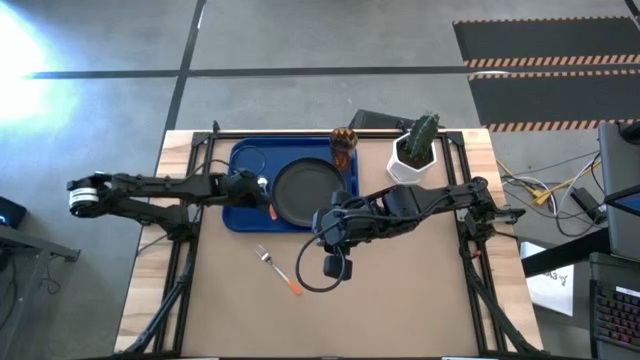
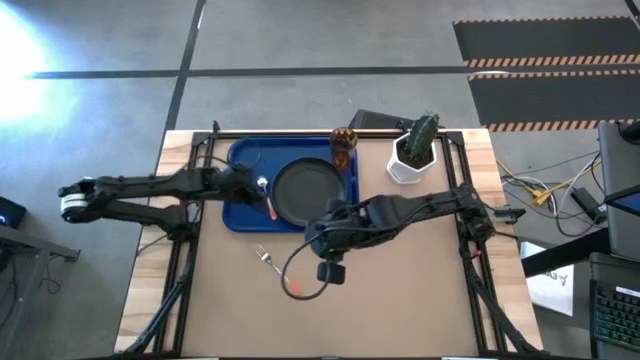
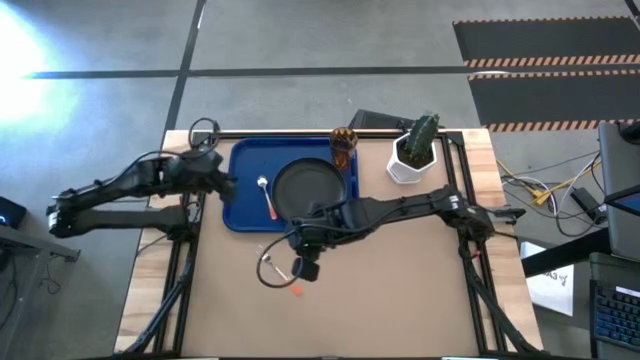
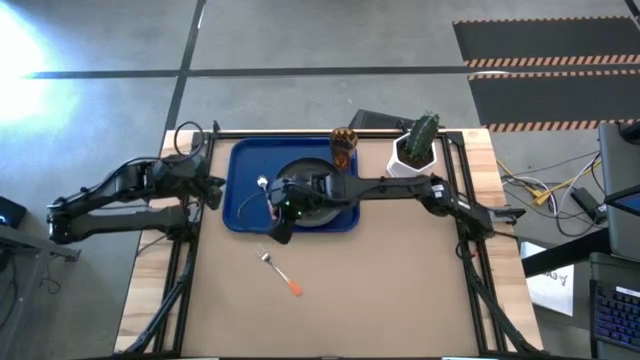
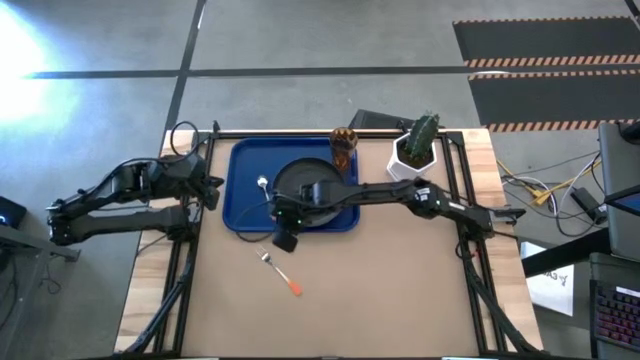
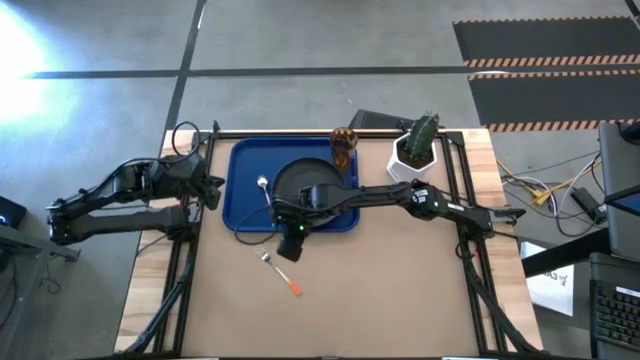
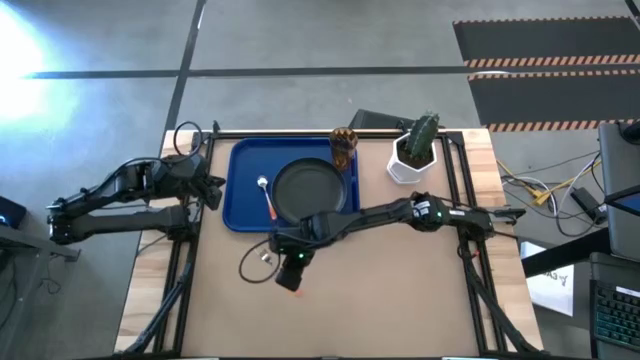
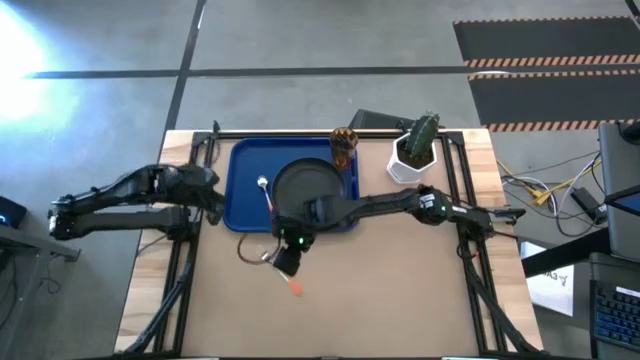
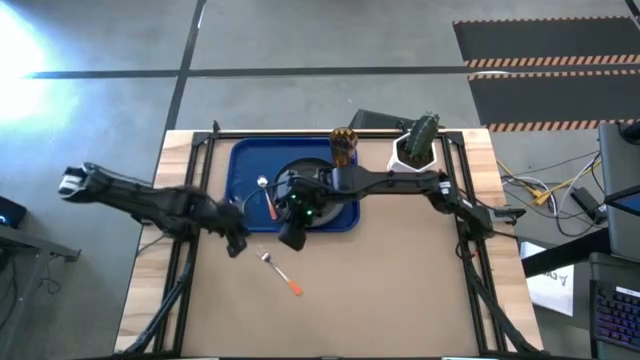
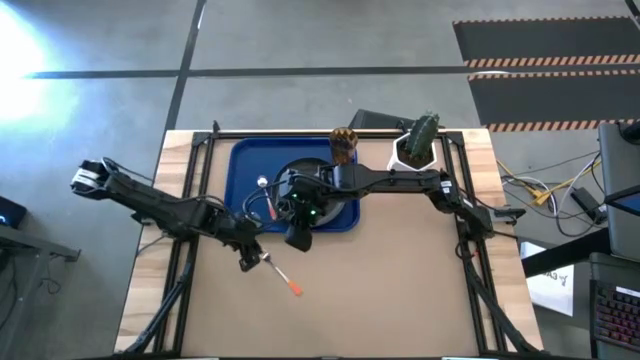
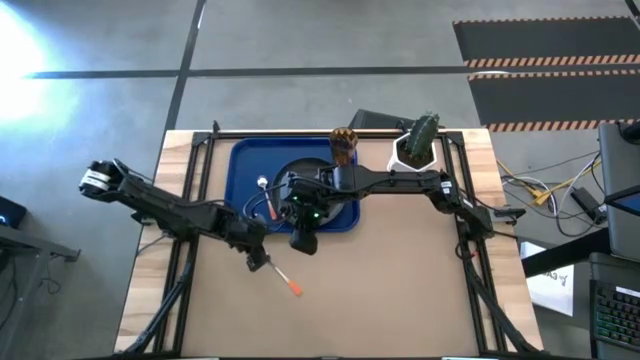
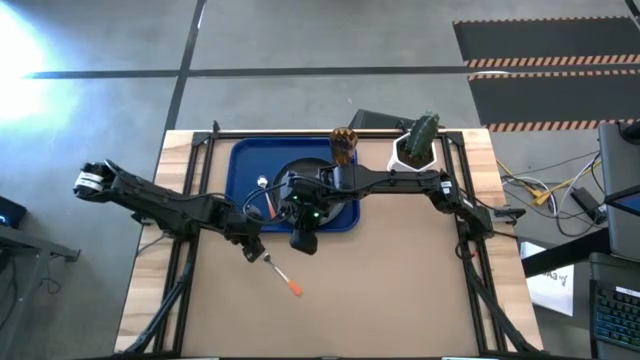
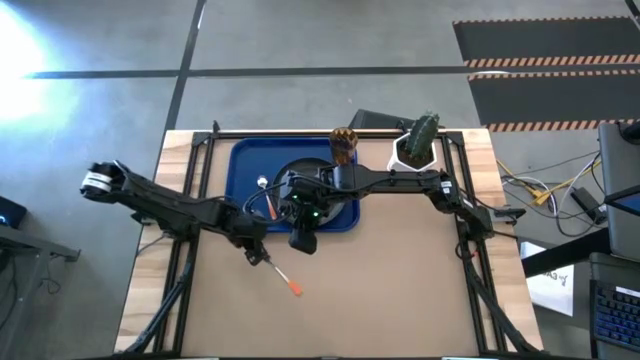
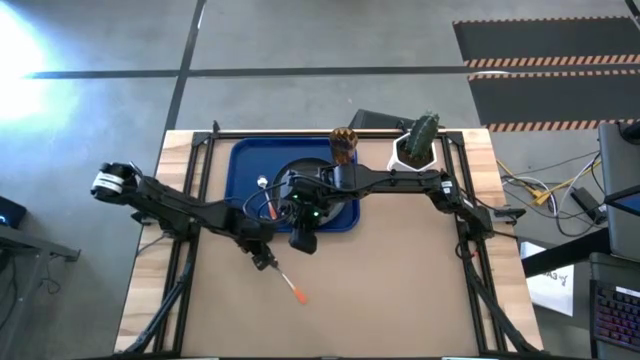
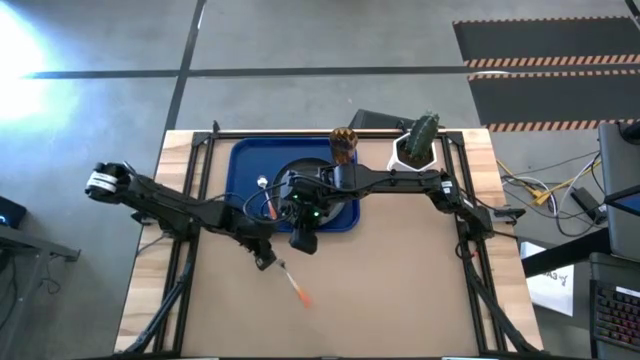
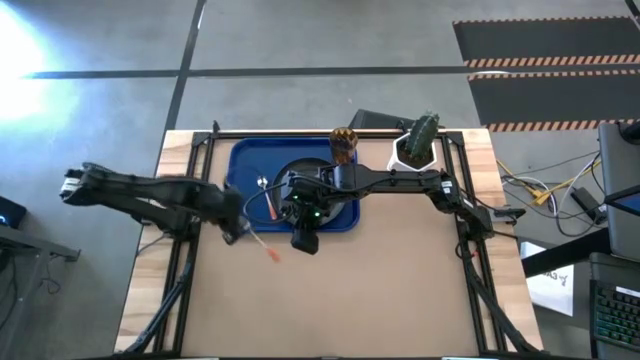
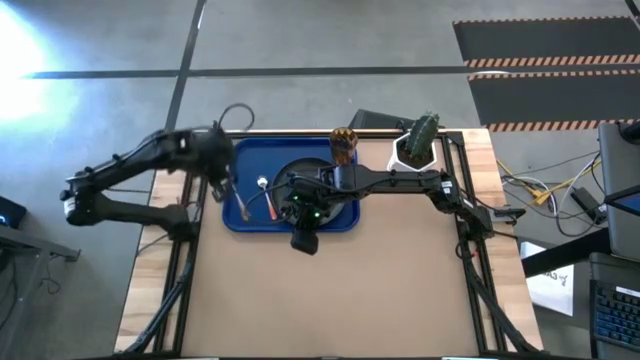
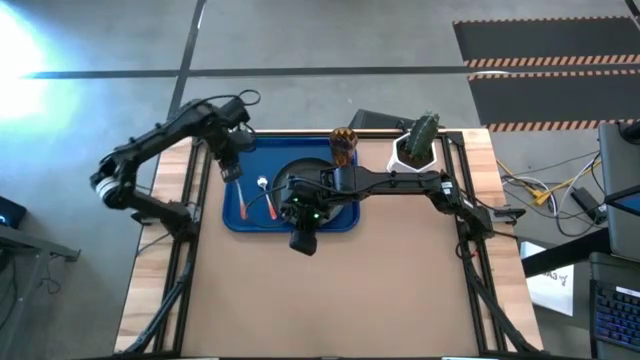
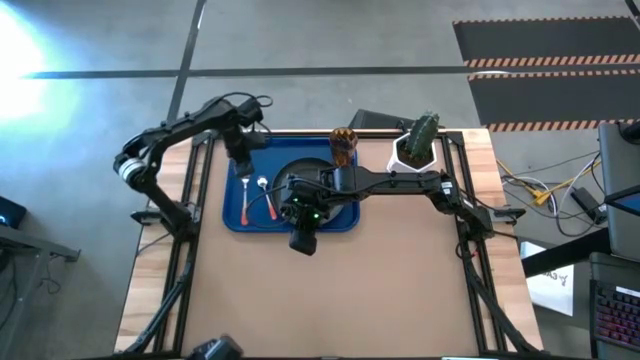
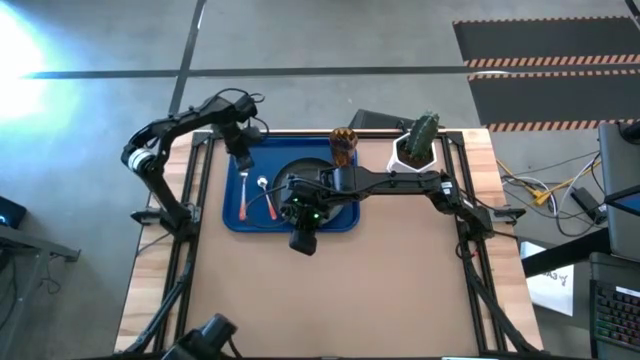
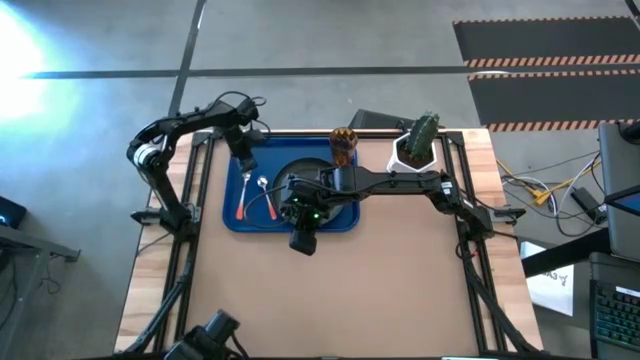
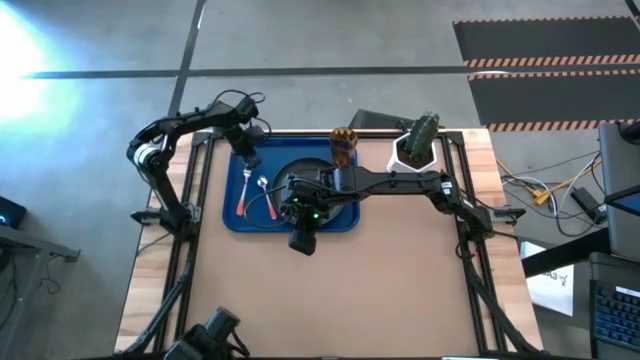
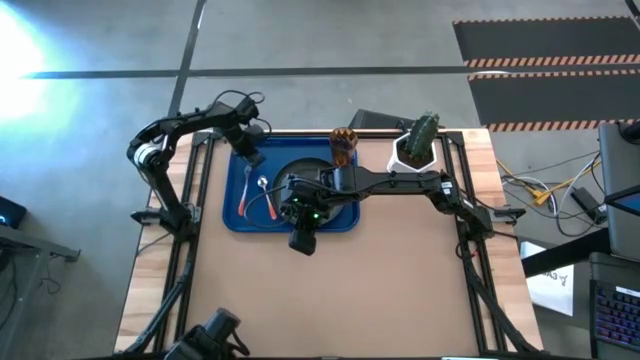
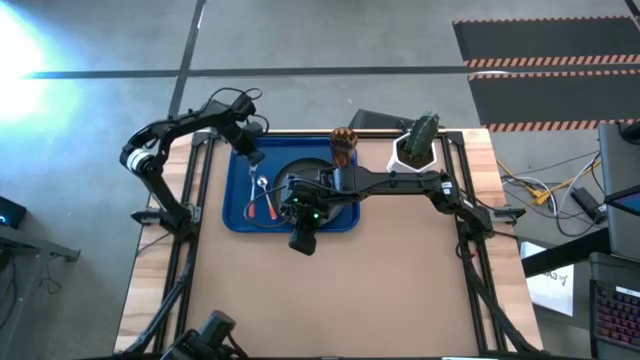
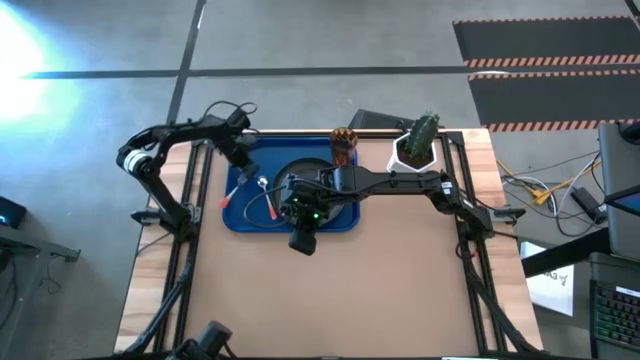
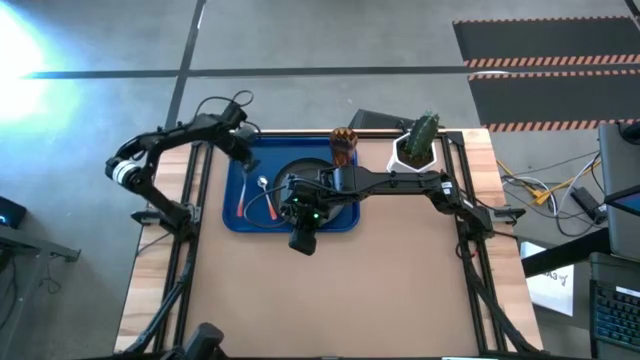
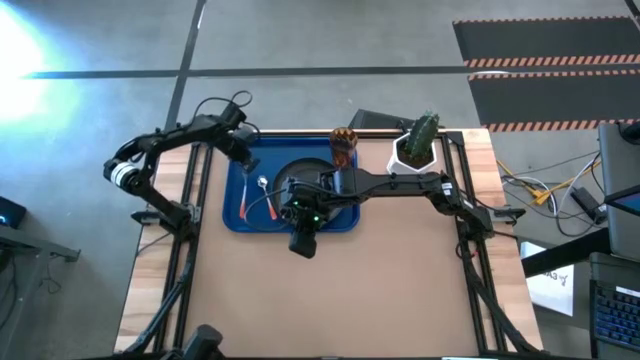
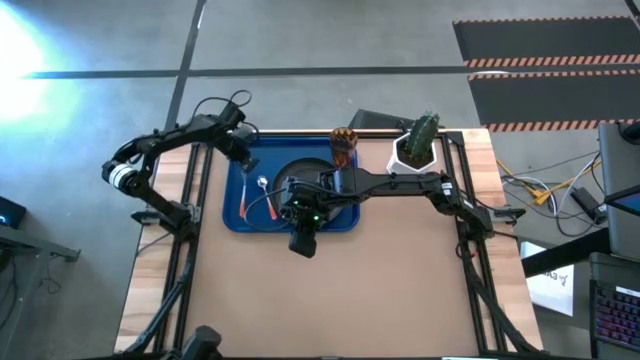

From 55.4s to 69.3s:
Task: Pick and place plate/cup/fork/spoon on tray
Put the orange fork on the blue tray to the left of the orange spoon

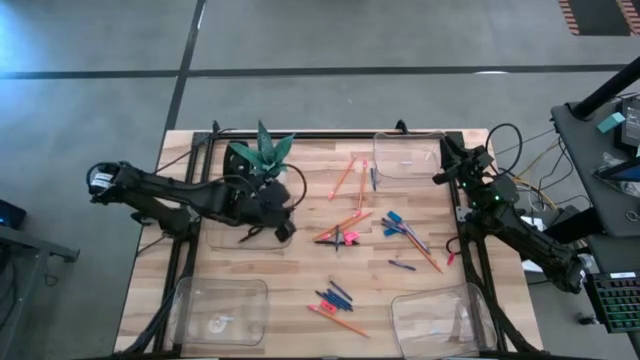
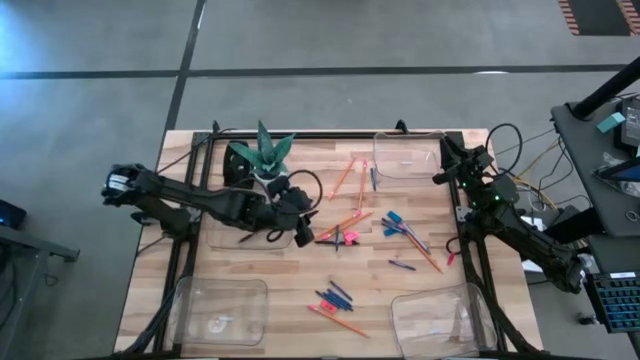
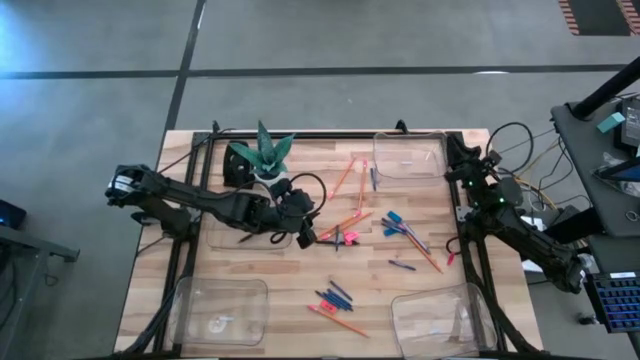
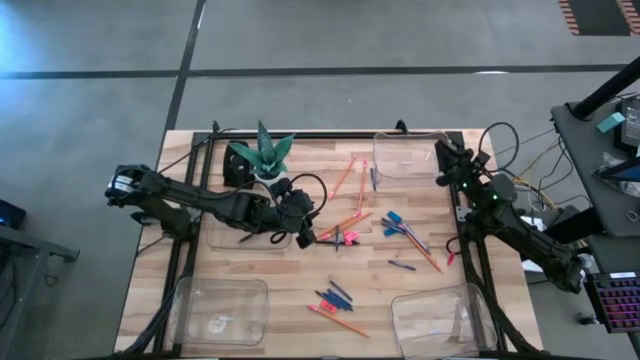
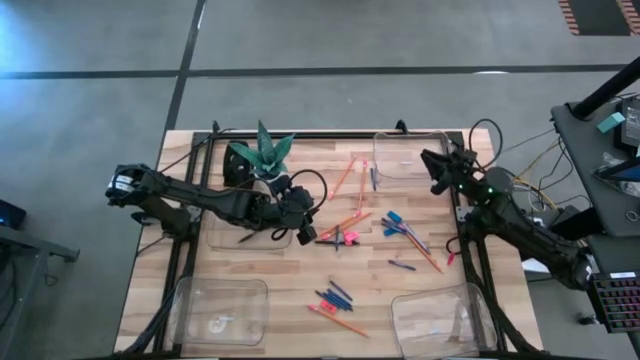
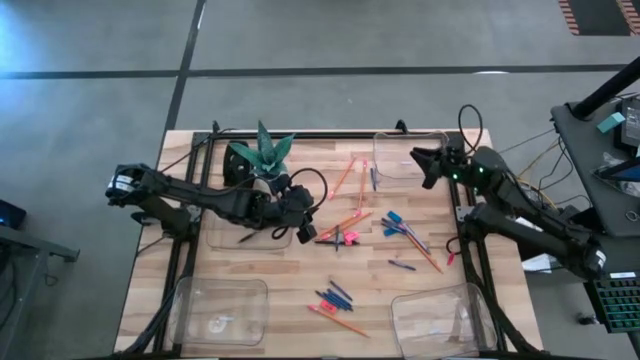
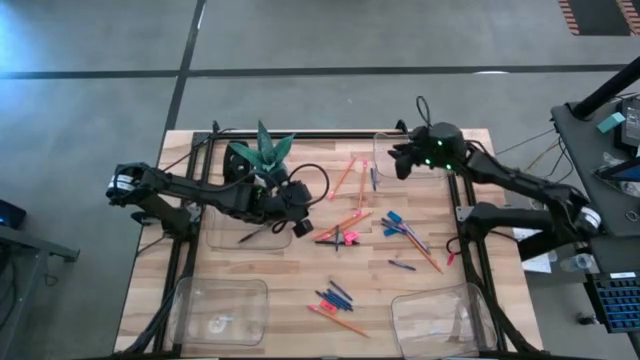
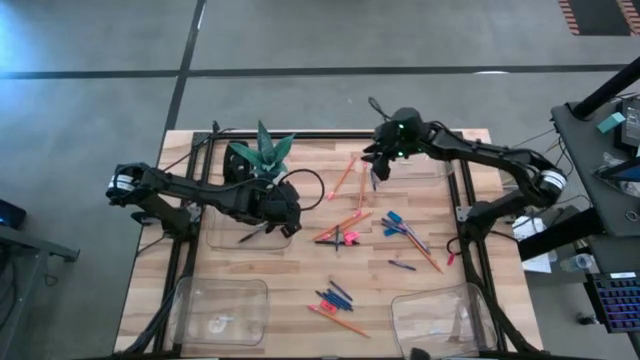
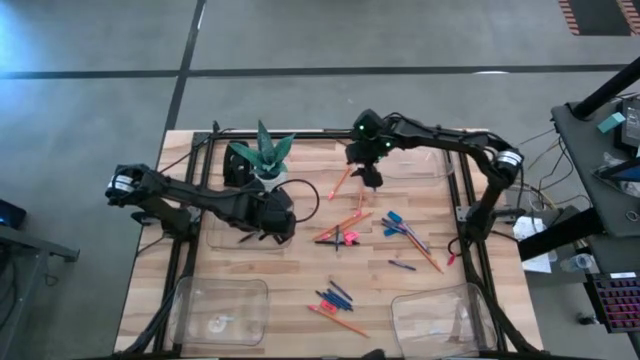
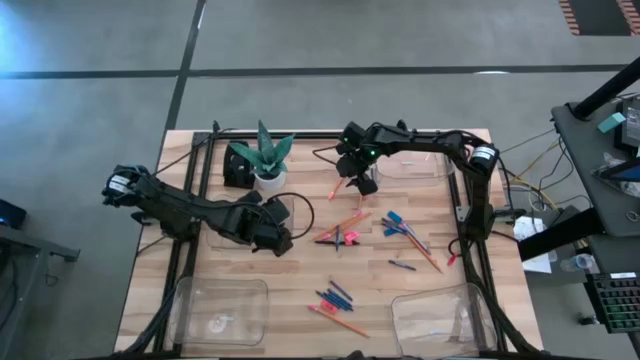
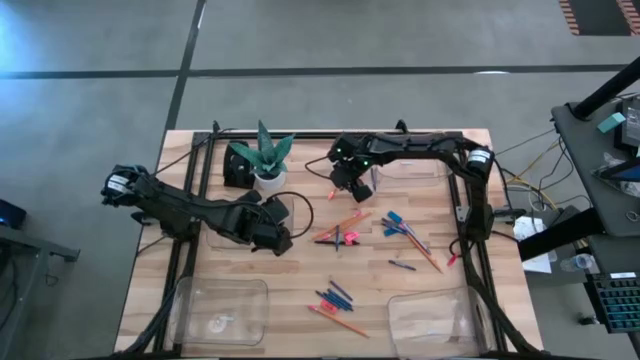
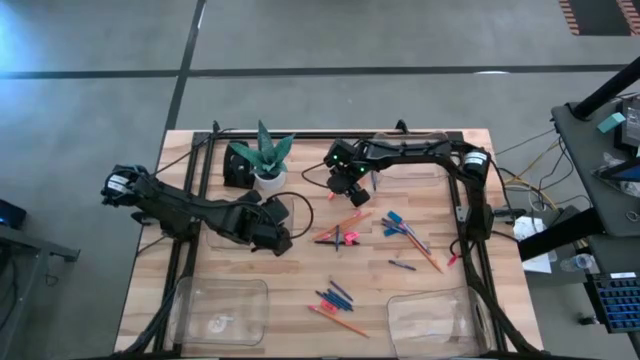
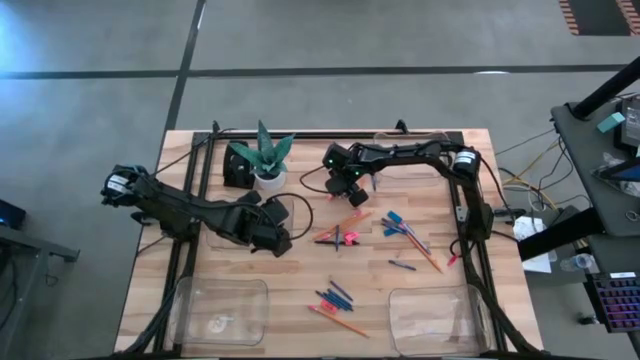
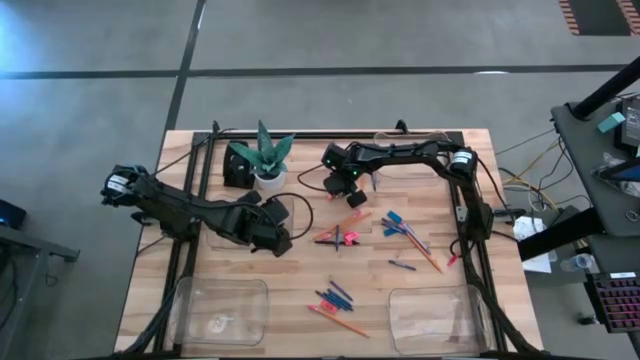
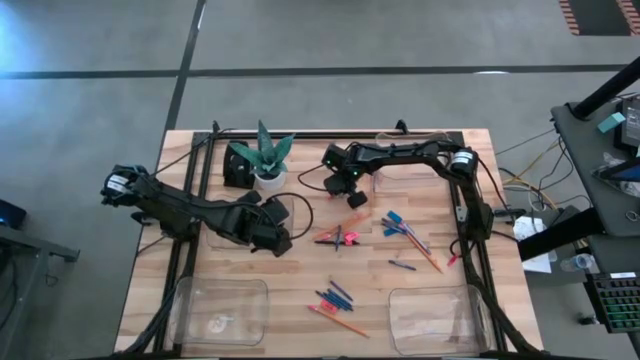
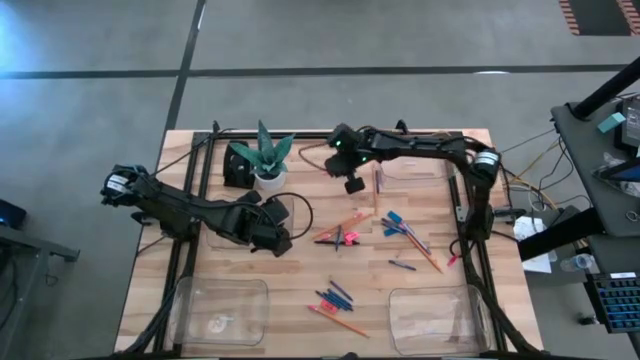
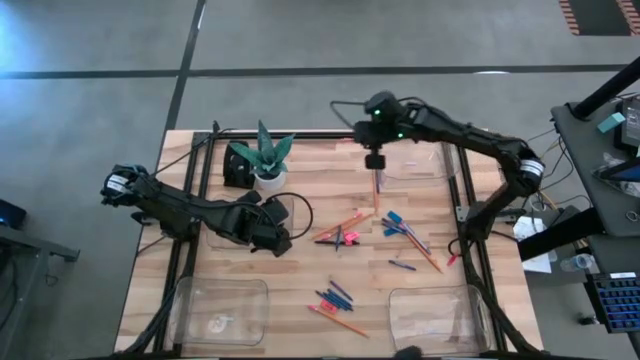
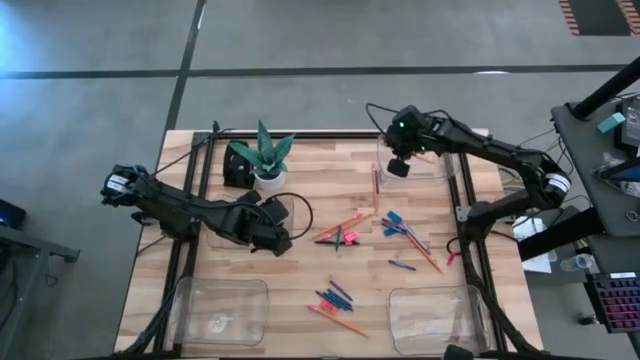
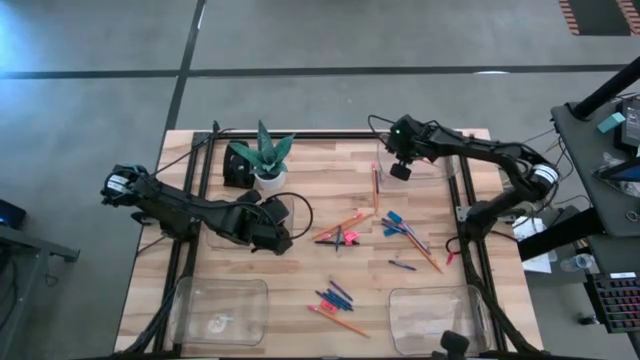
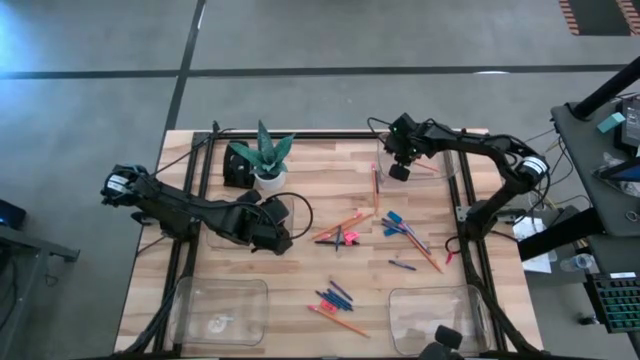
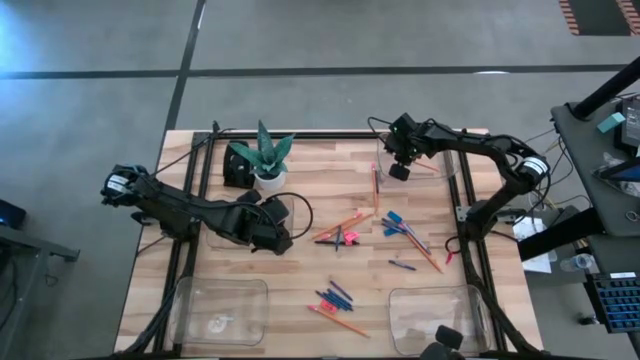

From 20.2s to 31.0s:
Task: Sort crayons/erasers/pens/pencils in bins
Put the orange pencil into the top right transparent bin
